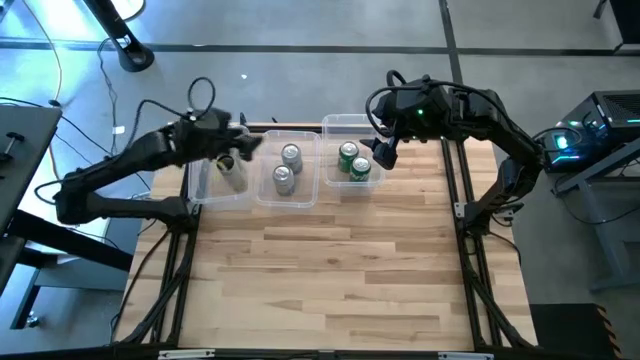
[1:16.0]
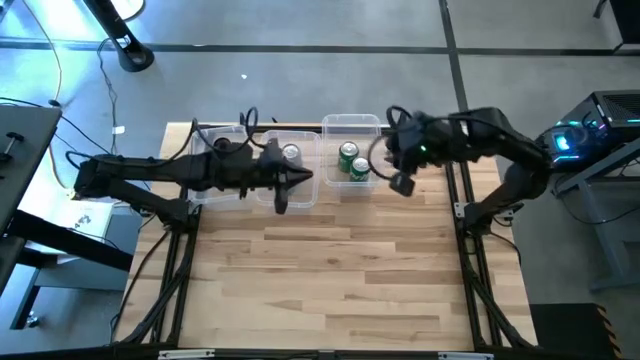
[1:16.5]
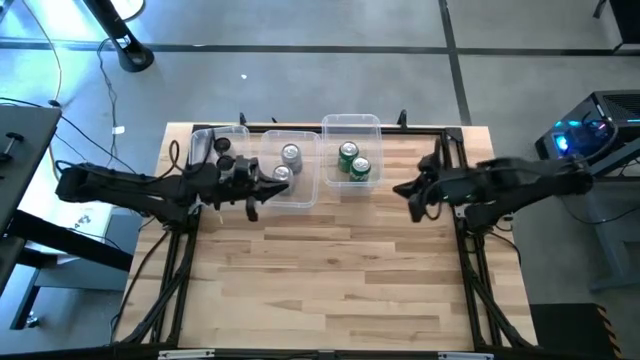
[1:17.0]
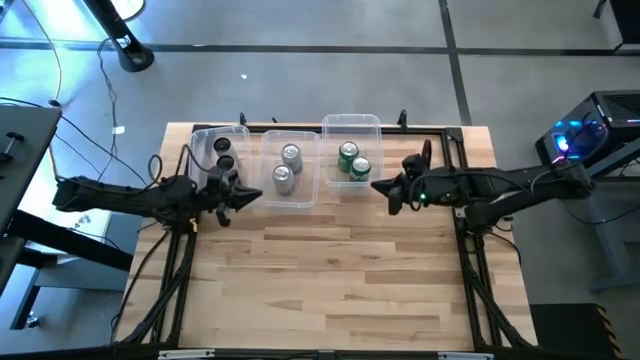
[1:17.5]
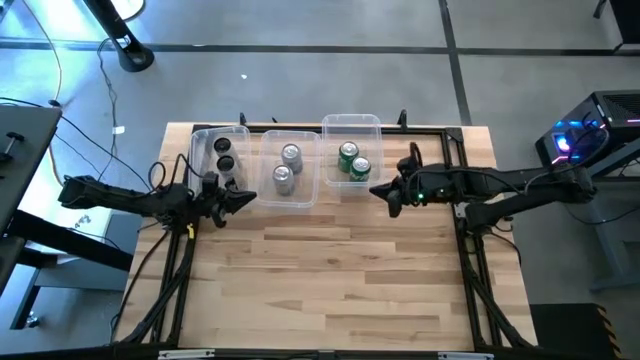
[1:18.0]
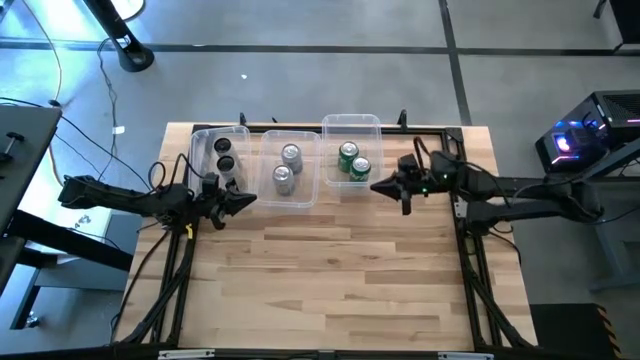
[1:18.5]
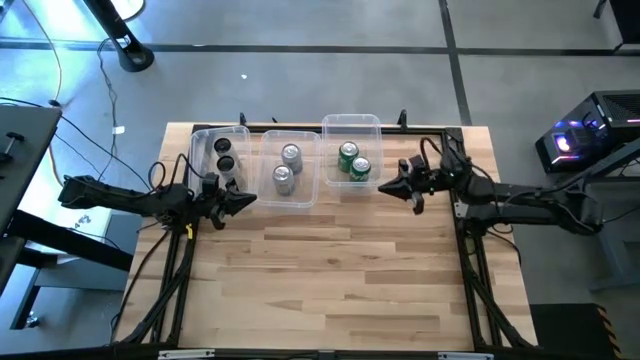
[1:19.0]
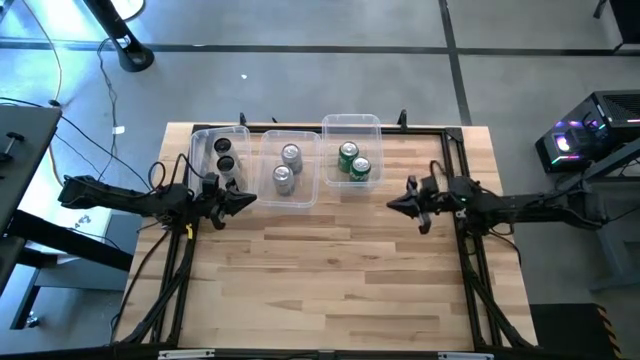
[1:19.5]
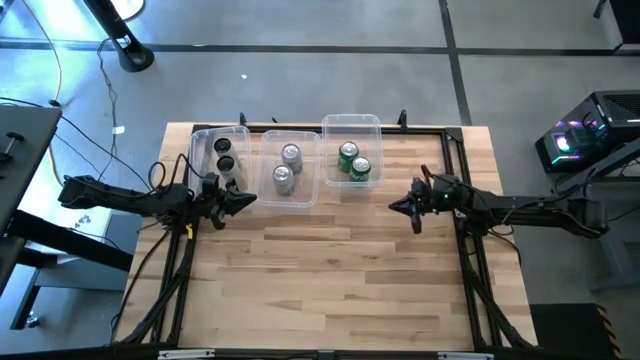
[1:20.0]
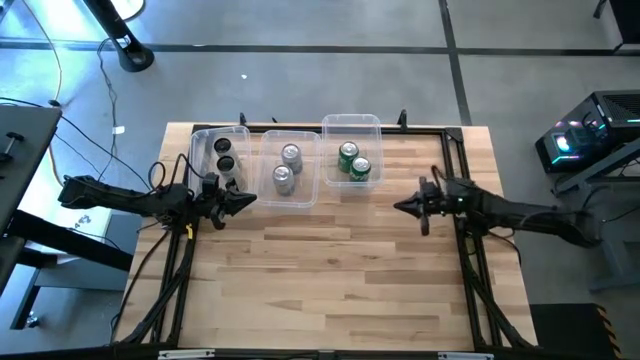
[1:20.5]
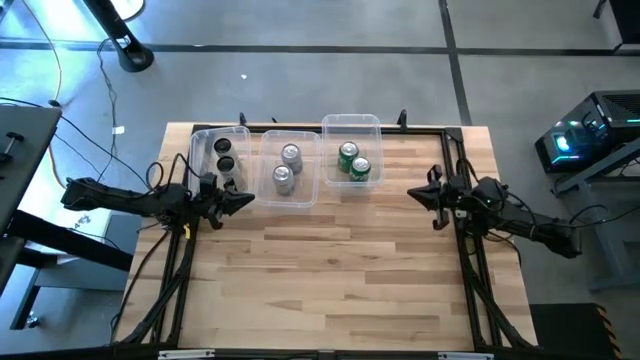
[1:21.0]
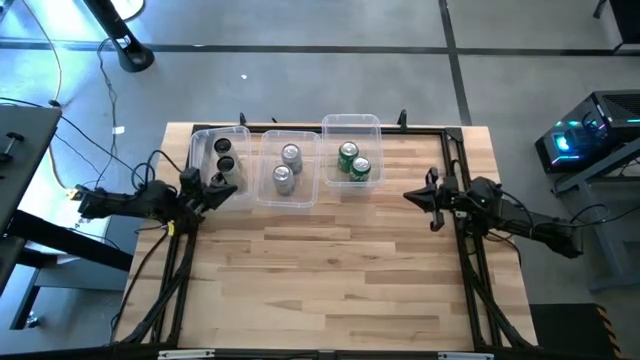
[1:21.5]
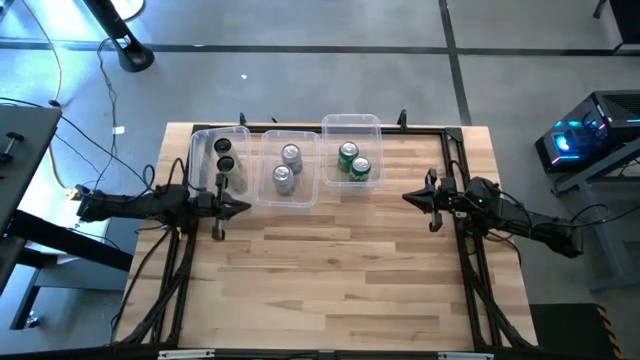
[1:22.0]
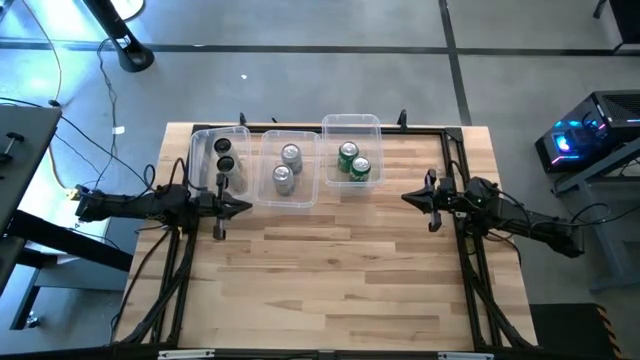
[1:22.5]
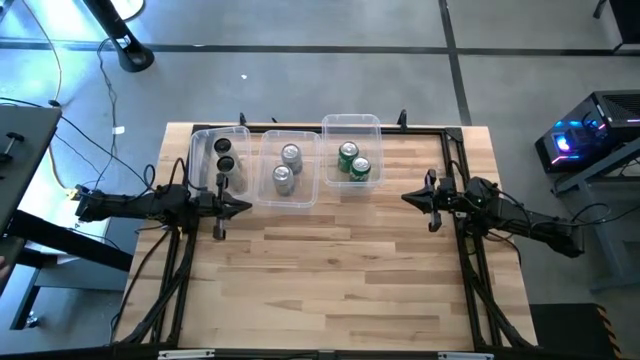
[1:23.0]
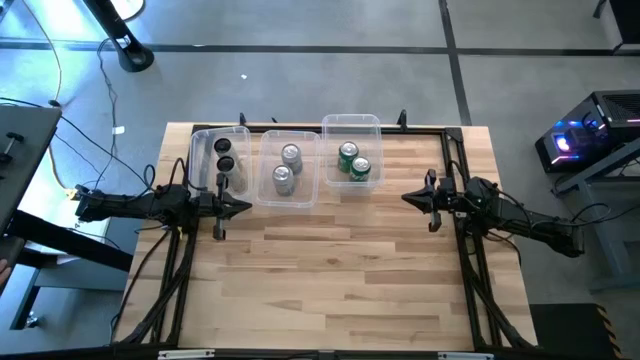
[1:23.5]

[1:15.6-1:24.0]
Task: Sort soda cans
Return to Home Position

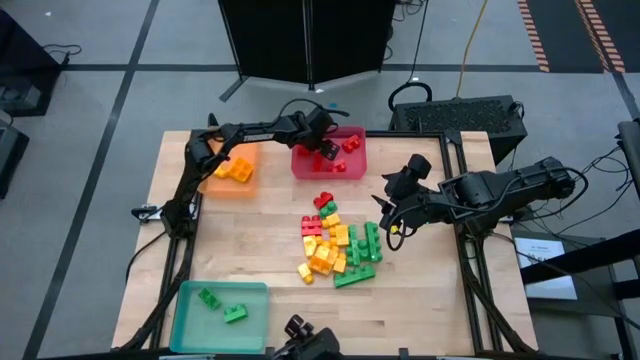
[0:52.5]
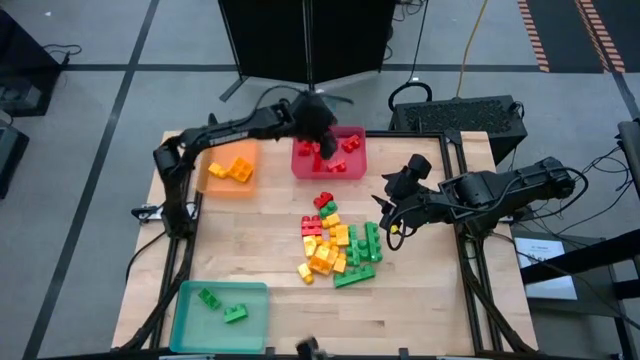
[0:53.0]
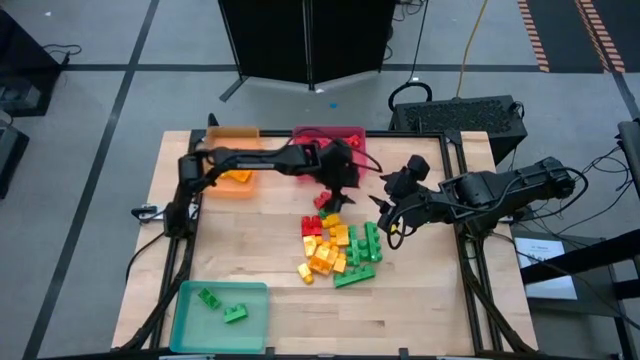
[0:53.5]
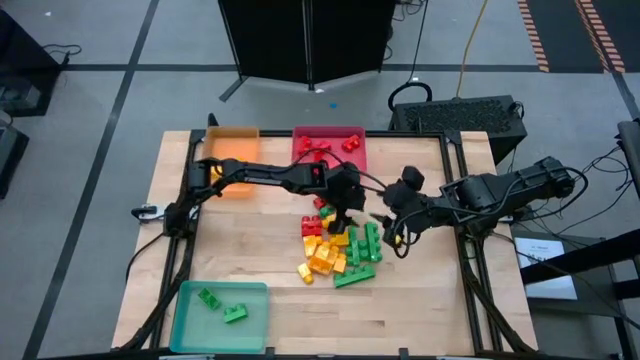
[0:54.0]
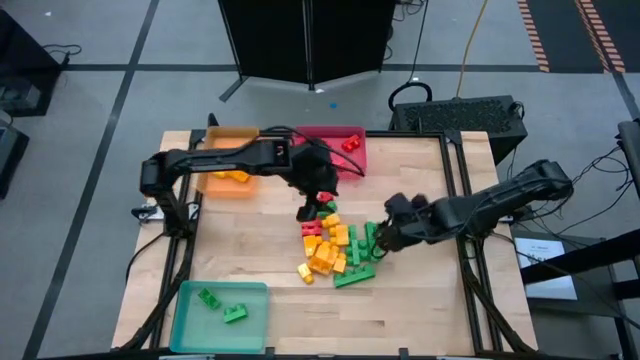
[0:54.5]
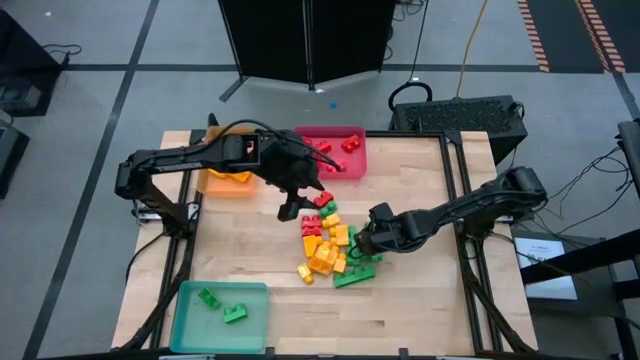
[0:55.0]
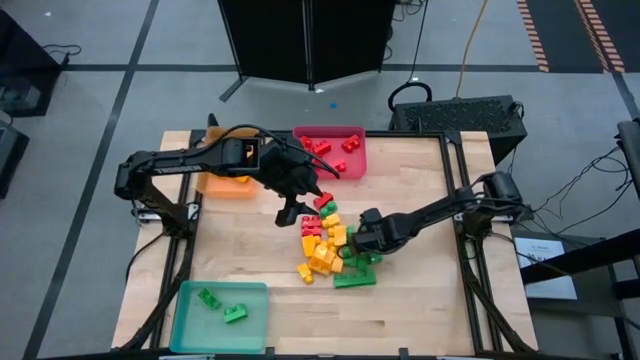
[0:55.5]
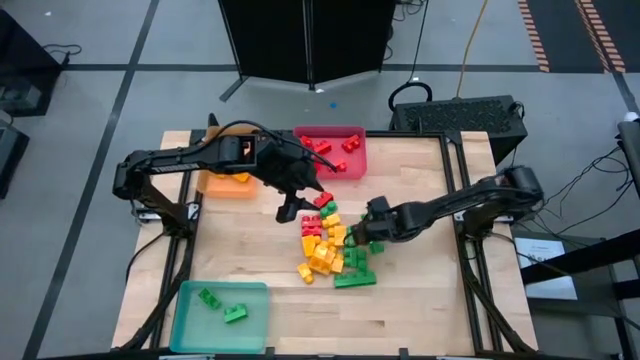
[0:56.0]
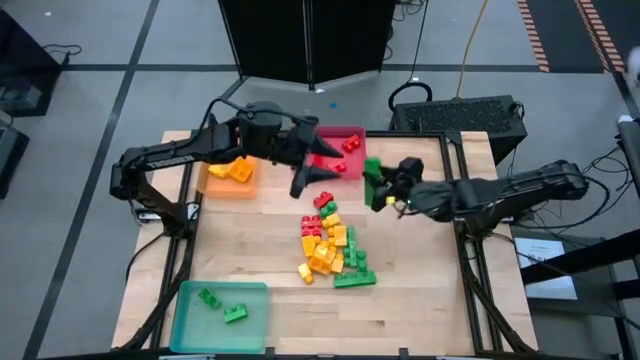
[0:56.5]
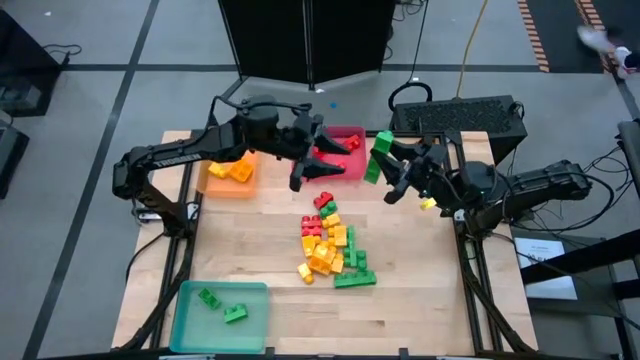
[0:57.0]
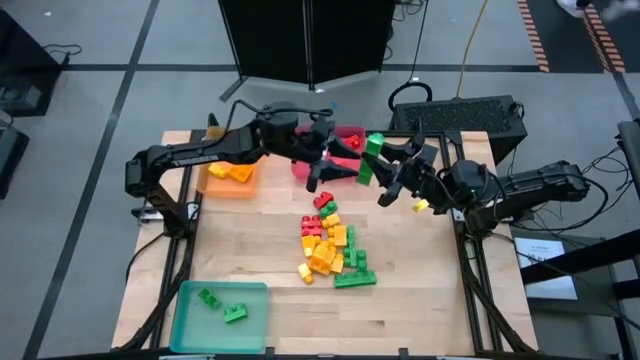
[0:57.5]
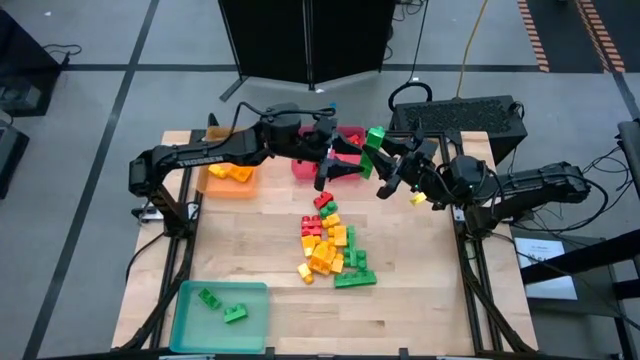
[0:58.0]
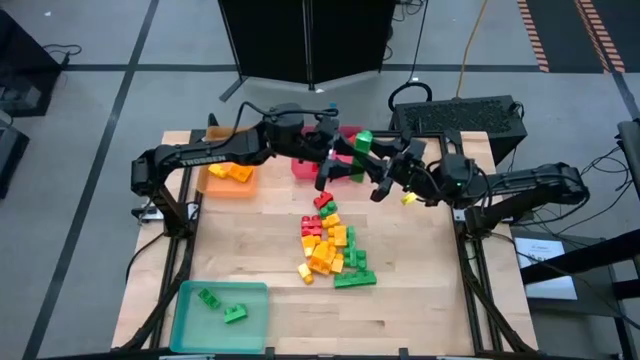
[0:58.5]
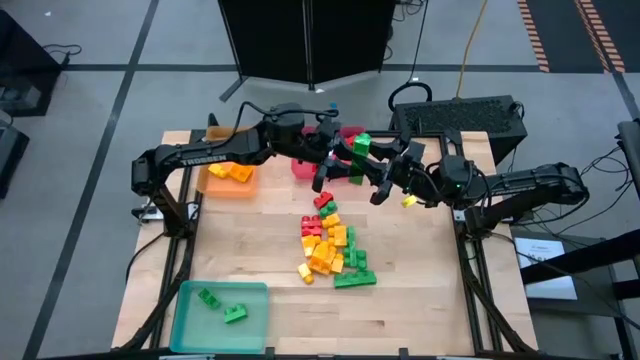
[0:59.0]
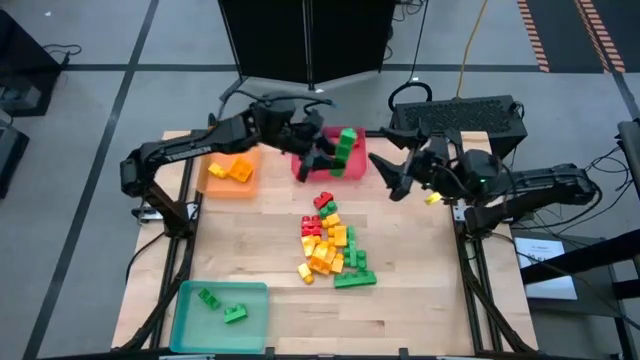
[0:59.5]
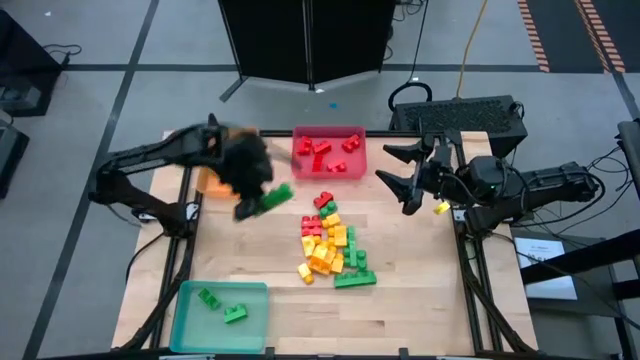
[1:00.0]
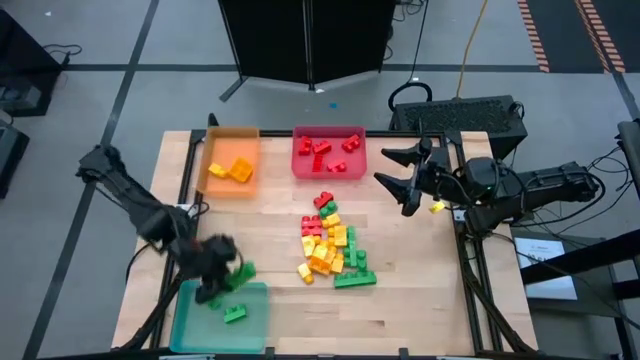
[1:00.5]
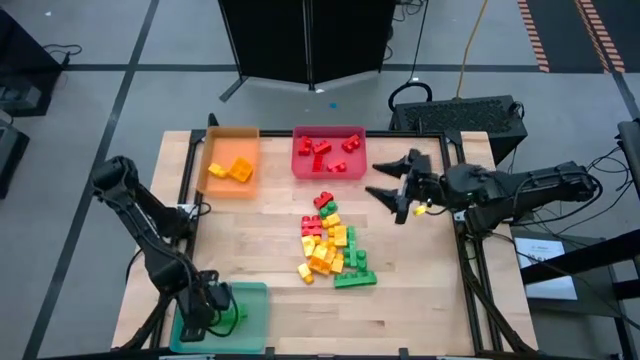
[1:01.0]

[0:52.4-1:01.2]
Task: Sort blocks
Put the green game piece into the blue bin

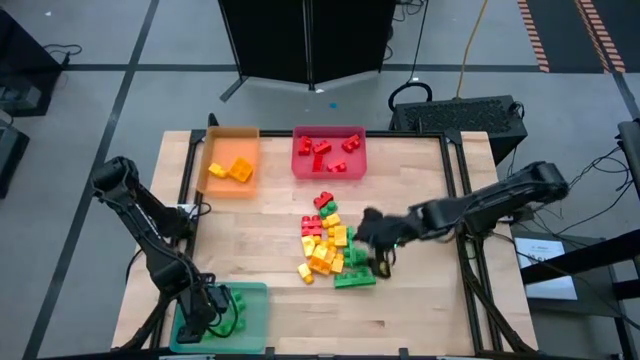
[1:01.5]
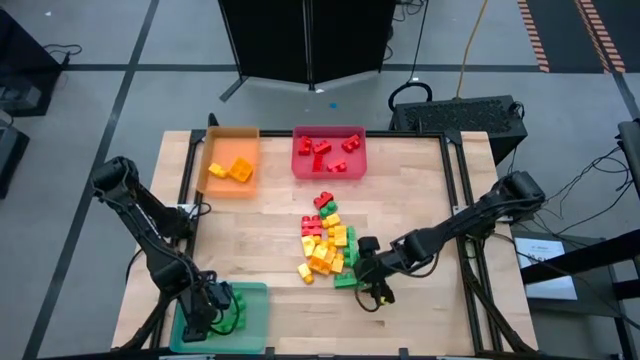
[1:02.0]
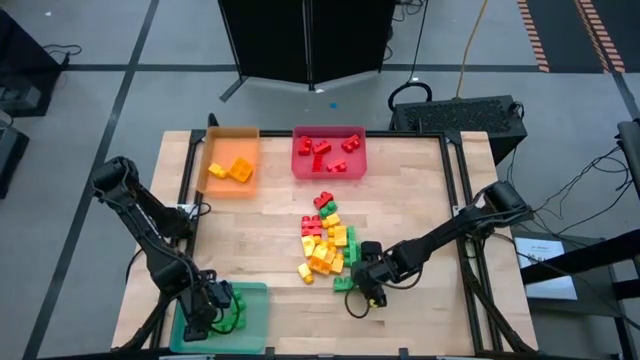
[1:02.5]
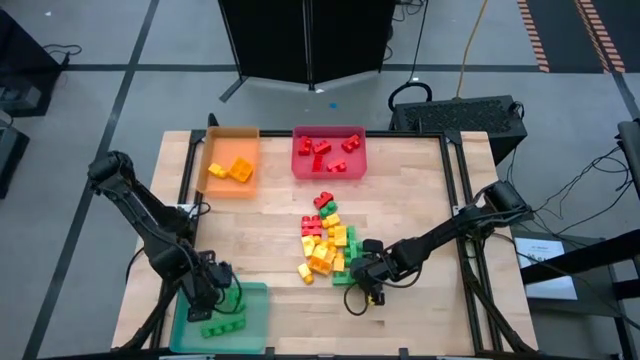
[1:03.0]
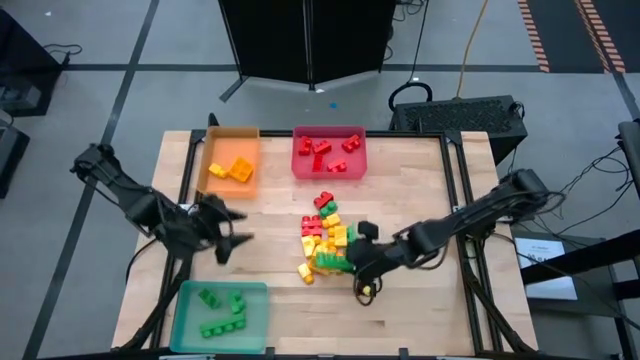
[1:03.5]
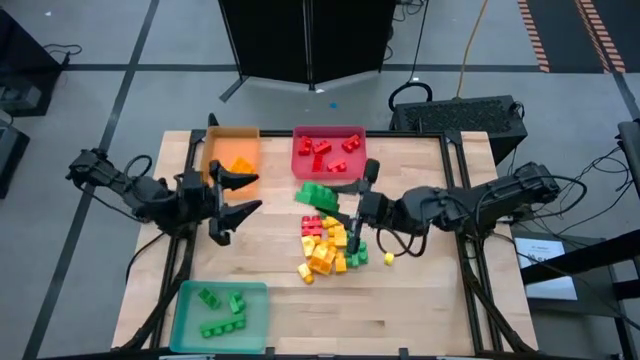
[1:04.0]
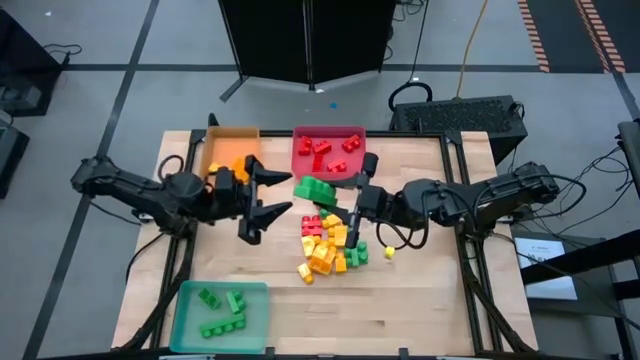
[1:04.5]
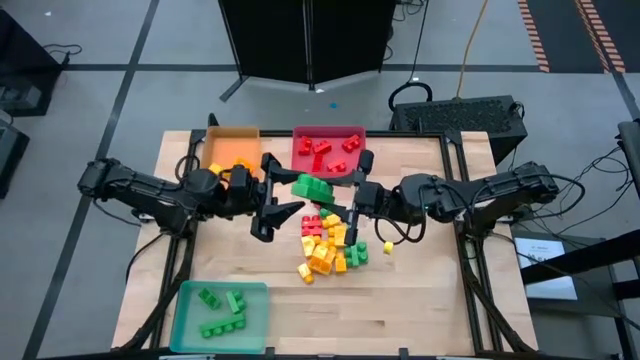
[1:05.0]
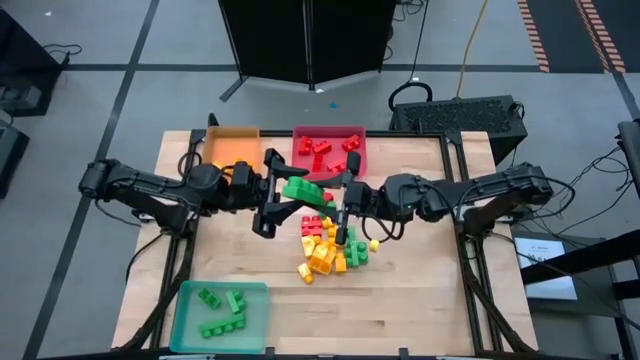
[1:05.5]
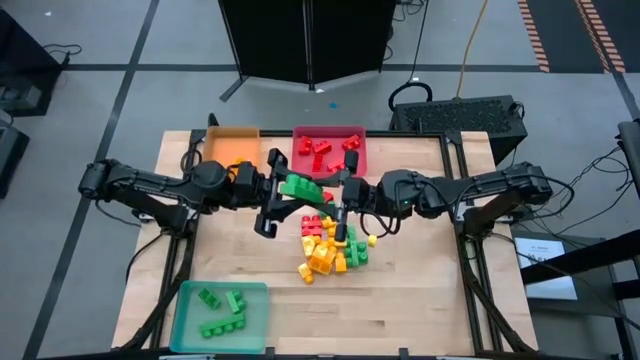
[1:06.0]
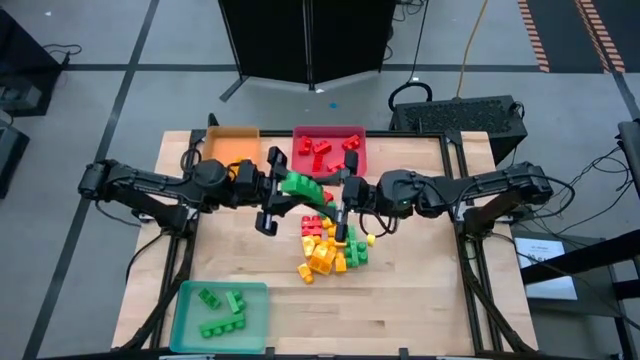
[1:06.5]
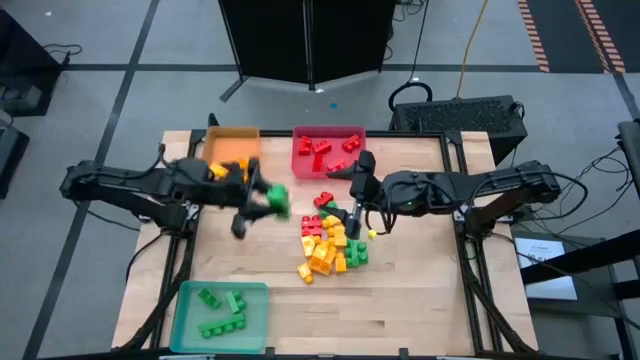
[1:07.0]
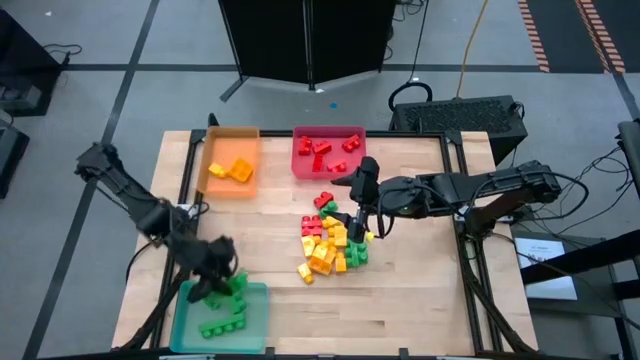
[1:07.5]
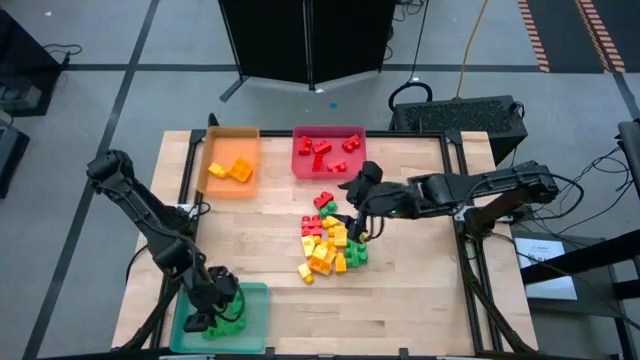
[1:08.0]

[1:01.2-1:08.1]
Put the green game piece into the blue bin
